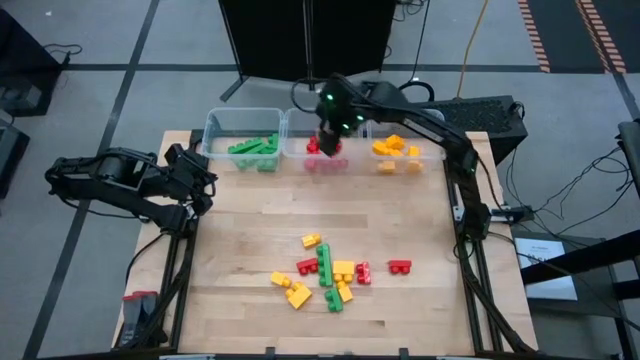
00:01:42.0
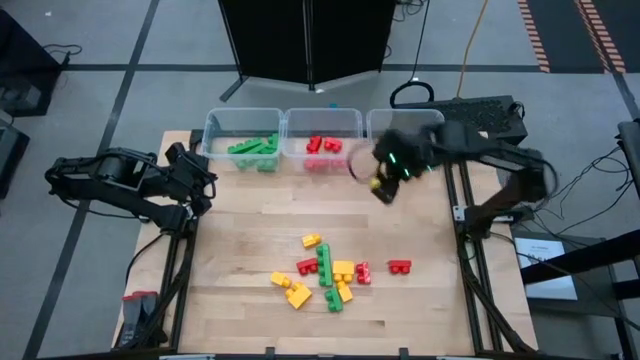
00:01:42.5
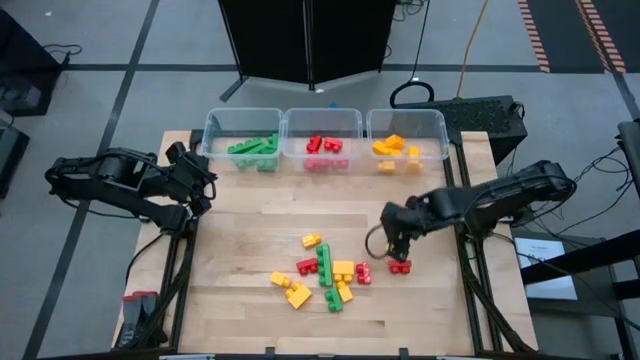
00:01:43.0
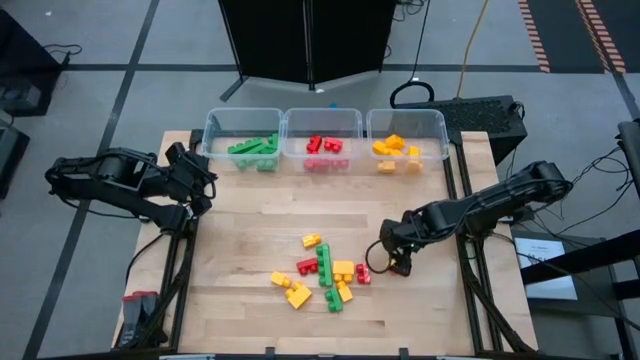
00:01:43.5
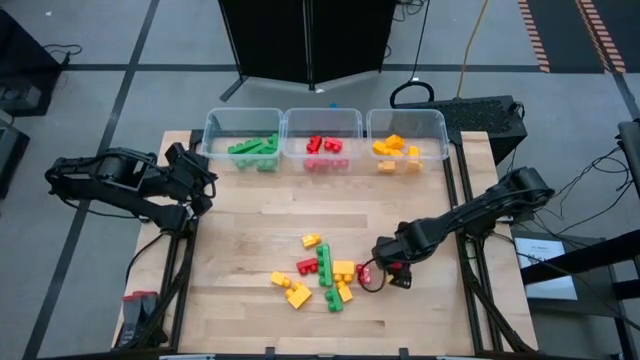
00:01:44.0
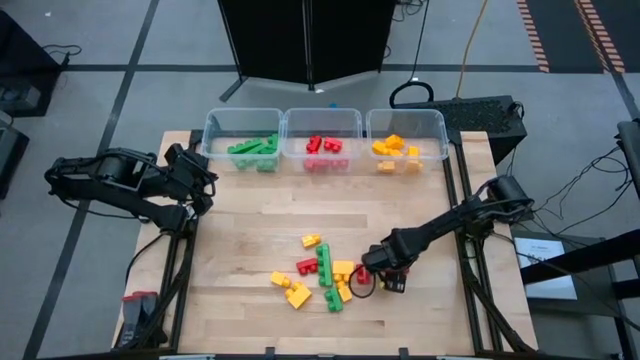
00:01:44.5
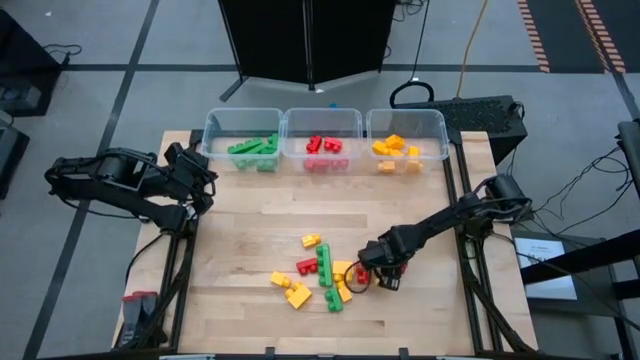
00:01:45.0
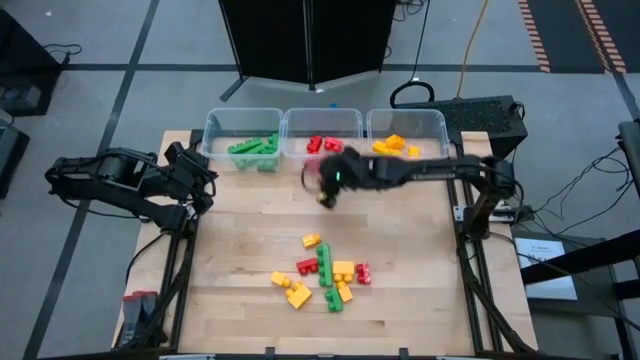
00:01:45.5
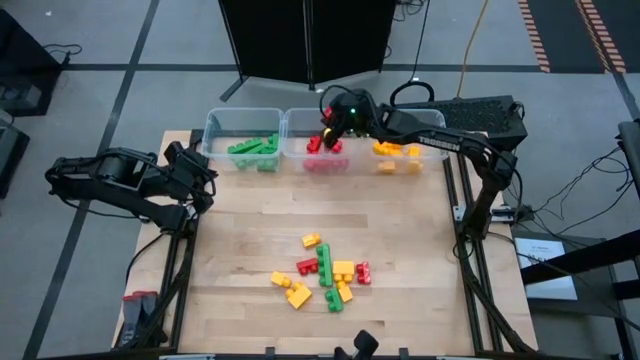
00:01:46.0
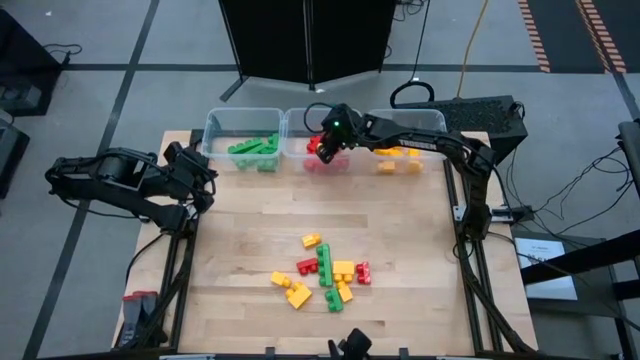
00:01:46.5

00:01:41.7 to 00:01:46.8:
Task: Sort blocks
Put the red game piece with 2 studs into the center transparent bin

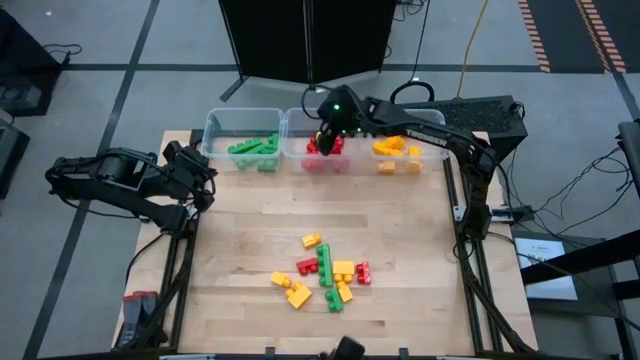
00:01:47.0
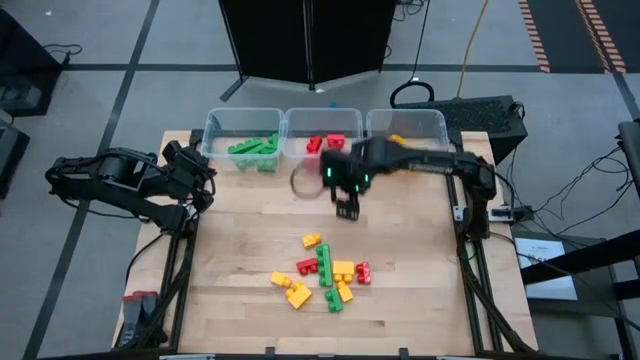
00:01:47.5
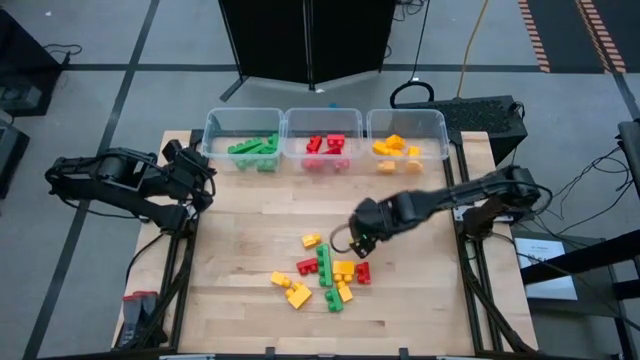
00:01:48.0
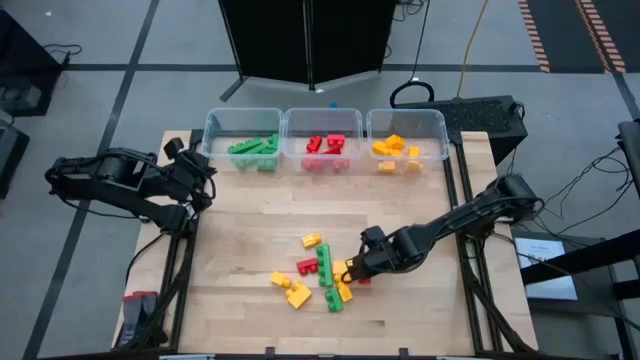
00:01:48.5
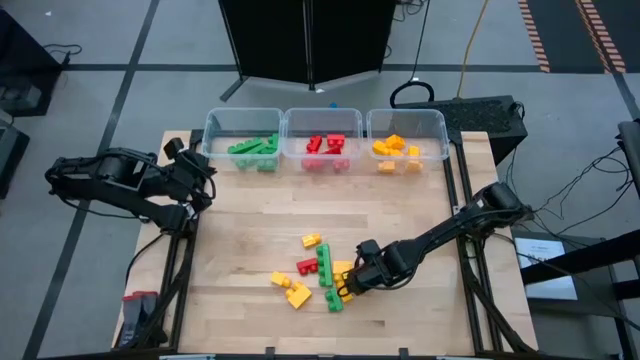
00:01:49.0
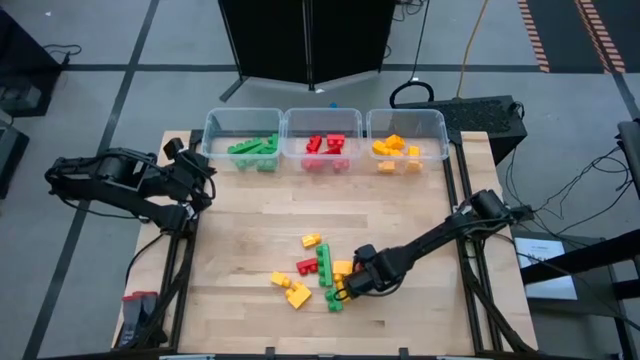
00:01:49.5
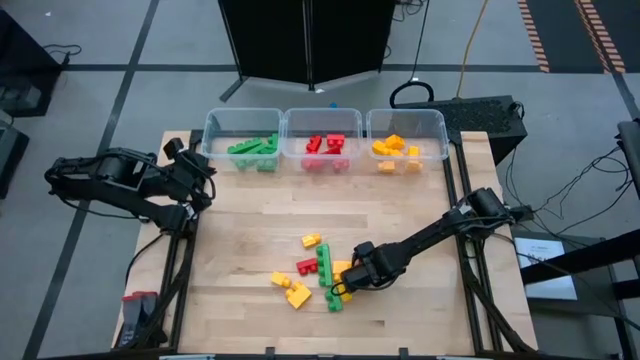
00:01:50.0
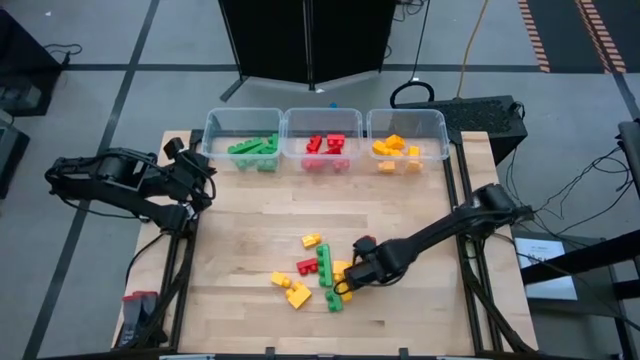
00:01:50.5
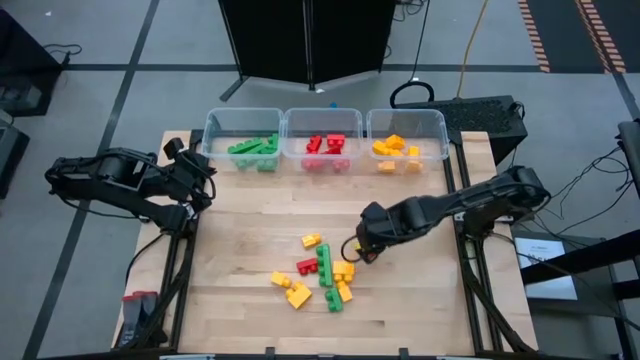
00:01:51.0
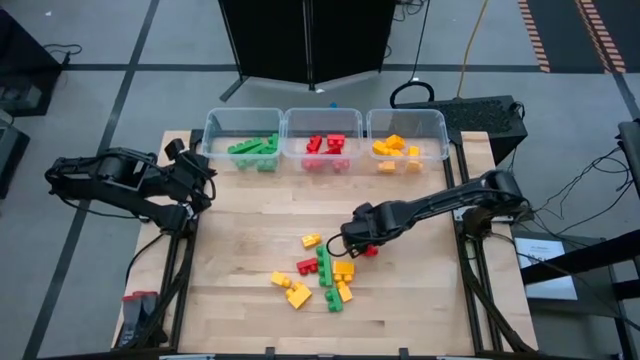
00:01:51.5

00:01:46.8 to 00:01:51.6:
Put the red game piece with 2 studs into the center transparent bin

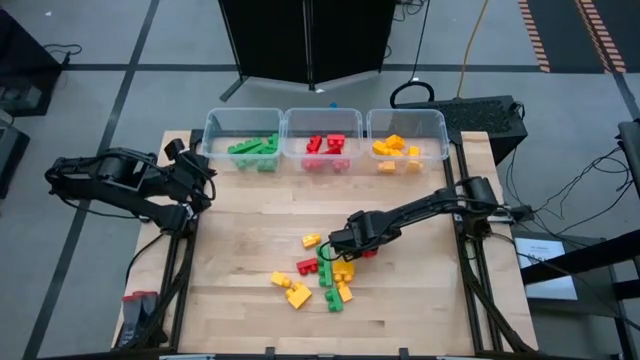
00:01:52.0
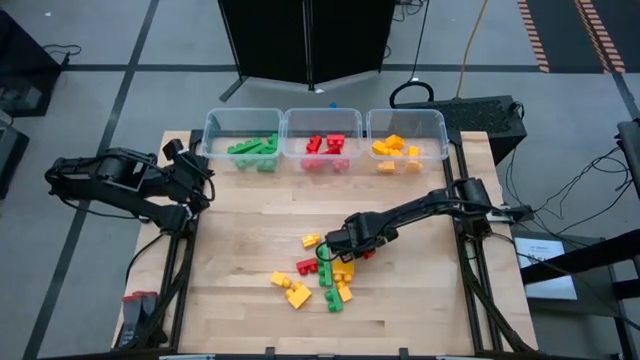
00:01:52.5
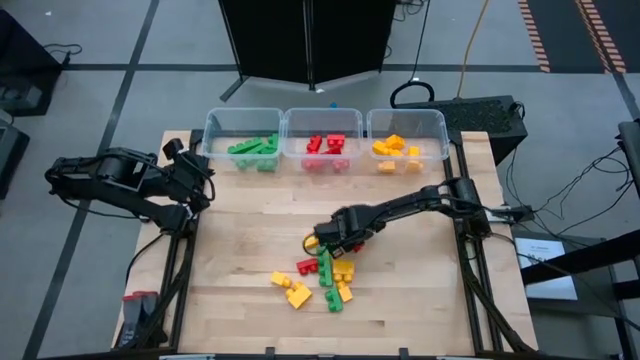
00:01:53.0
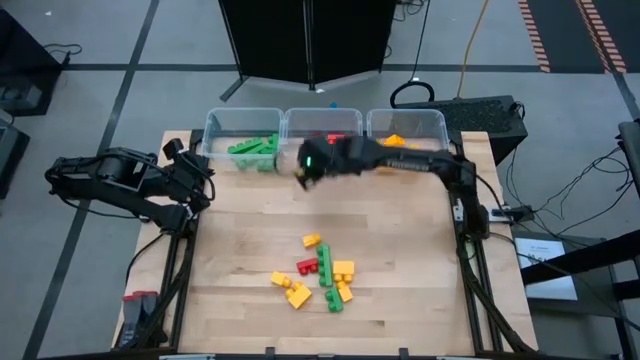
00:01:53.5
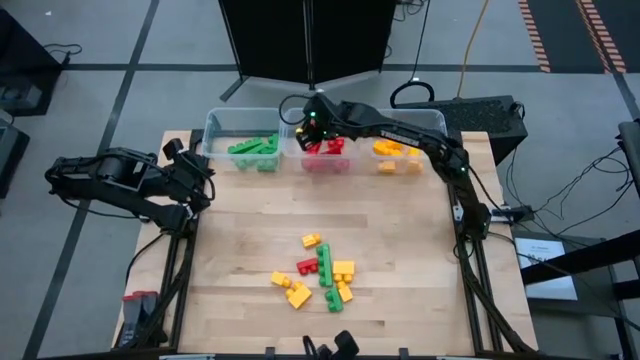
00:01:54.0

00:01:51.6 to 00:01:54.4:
Put the red game piece with 2 studs into the center transparent bin

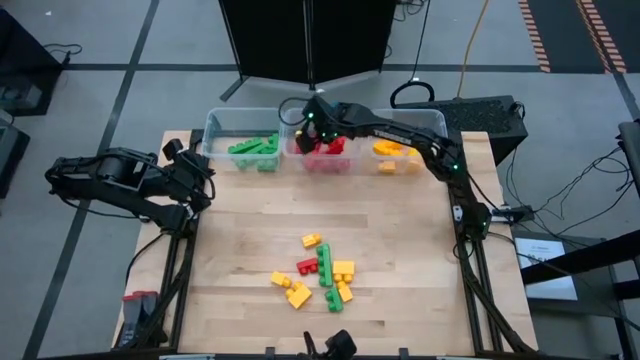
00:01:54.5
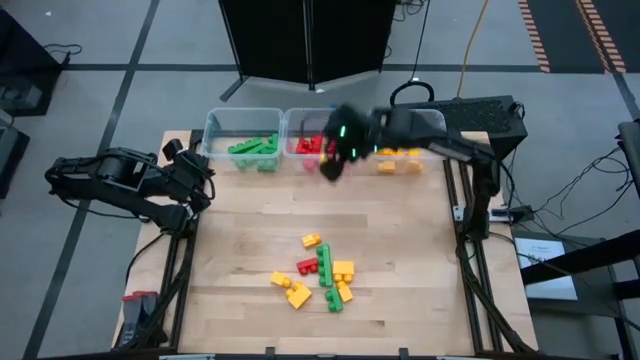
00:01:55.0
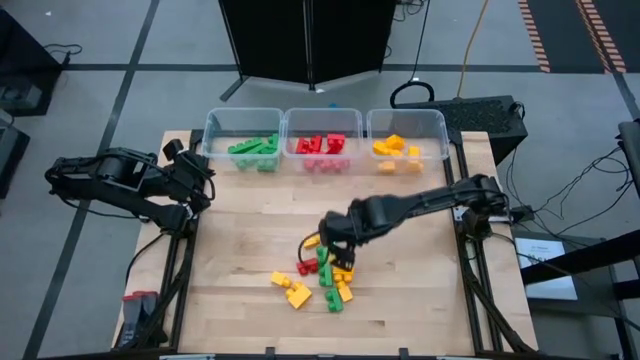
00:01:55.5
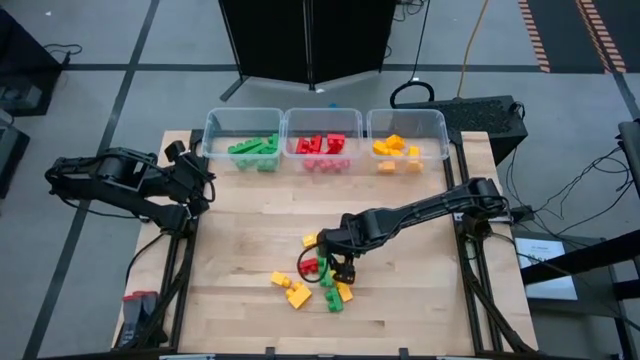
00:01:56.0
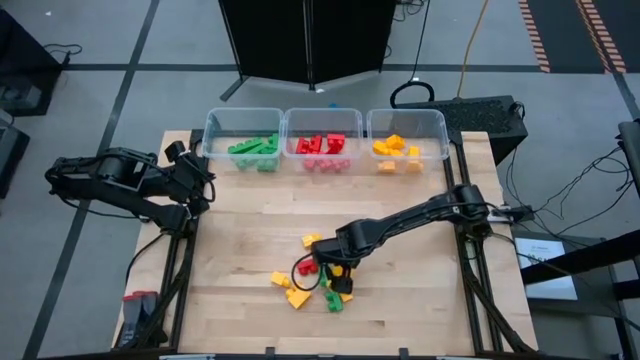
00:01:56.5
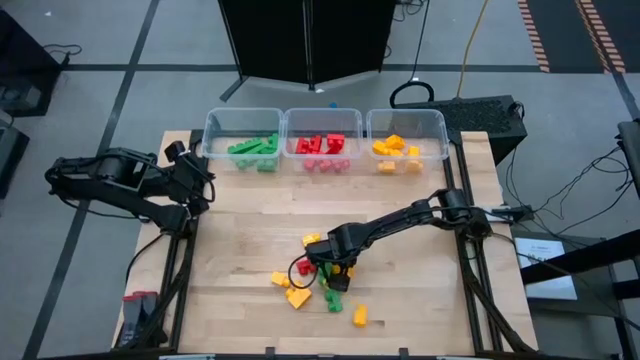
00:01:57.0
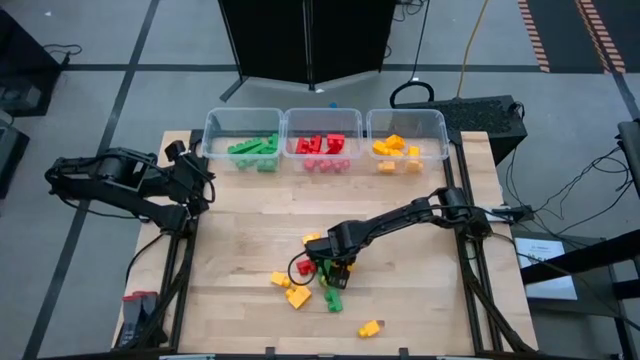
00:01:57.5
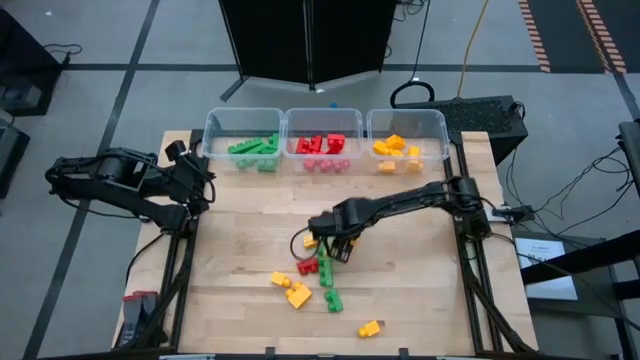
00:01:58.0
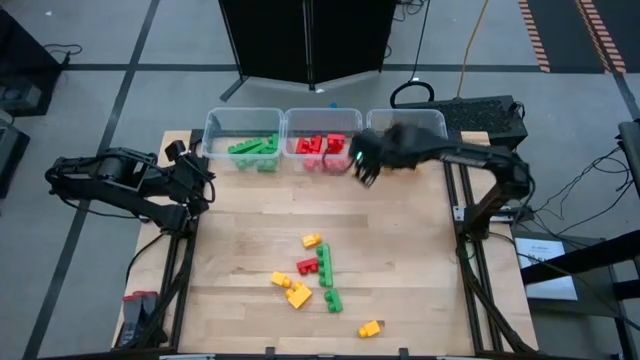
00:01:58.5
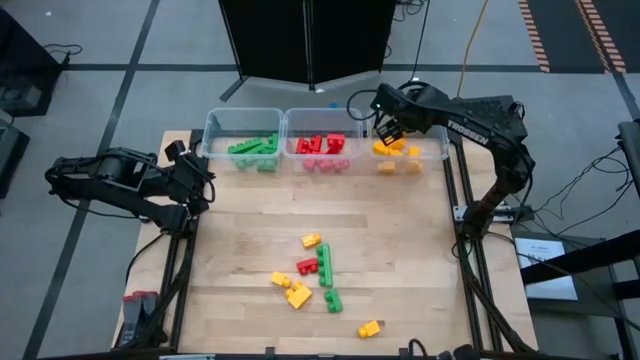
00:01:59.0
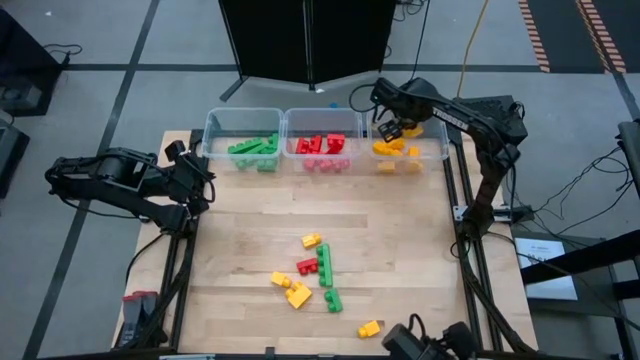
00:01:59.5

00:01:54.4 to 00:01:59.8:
Put the yellow game piece with 2 studs into the right transparent bin

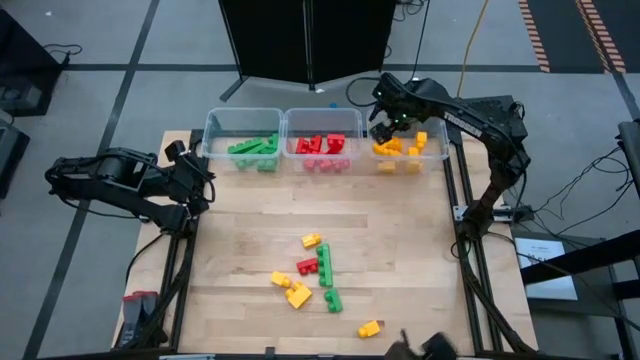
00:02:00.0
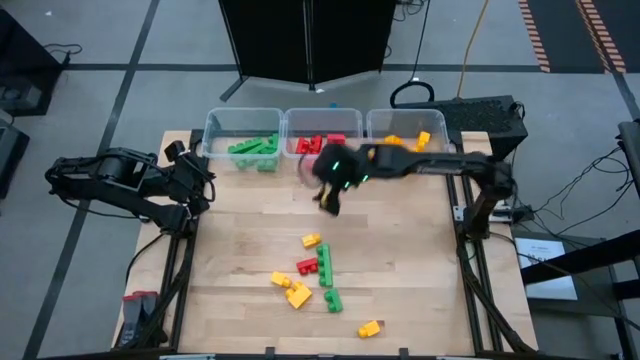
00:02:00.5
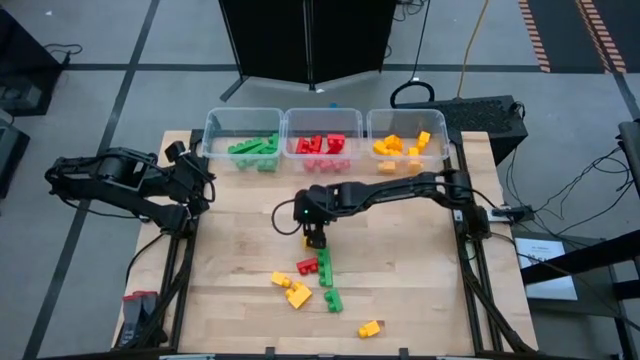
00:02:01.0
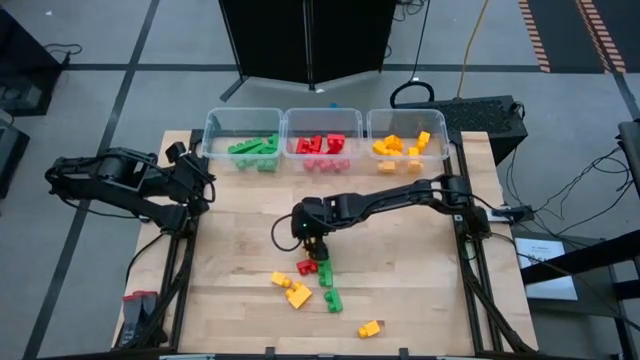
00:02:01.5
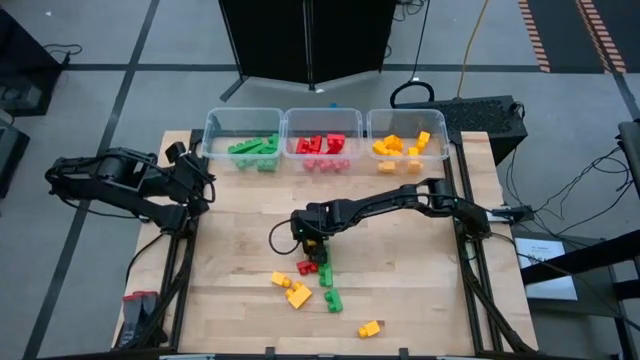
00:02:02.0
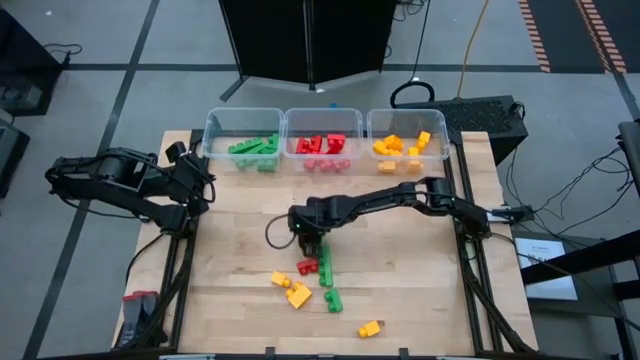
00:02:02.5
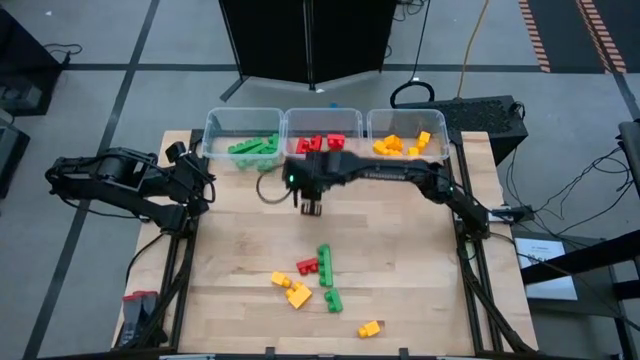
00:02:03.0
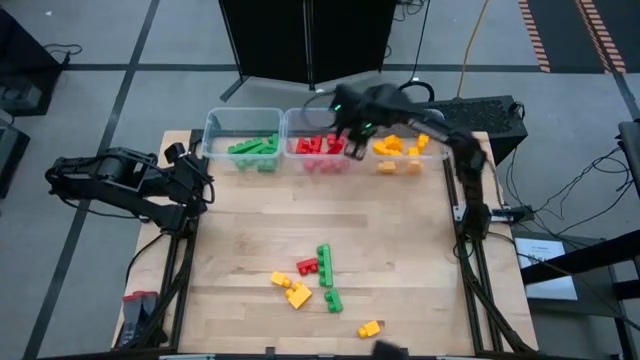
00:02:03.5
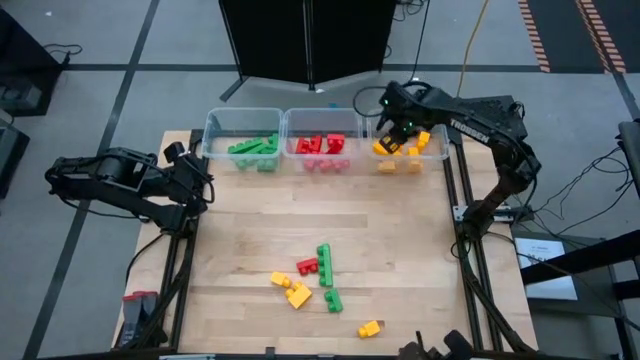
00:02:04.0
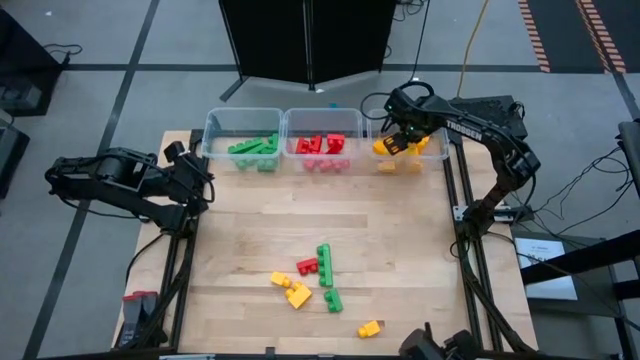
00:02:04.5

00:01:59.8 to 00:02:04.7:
Put the yellow game piece with 1 stud into the right transparent bin
